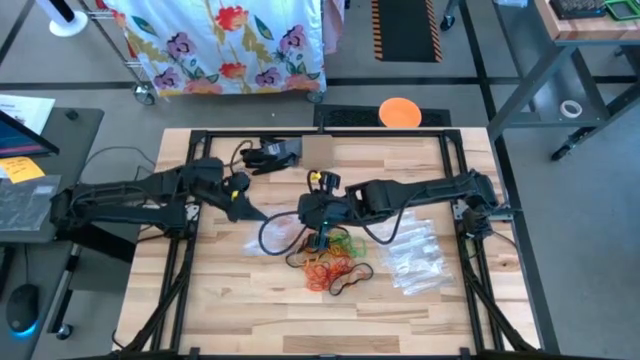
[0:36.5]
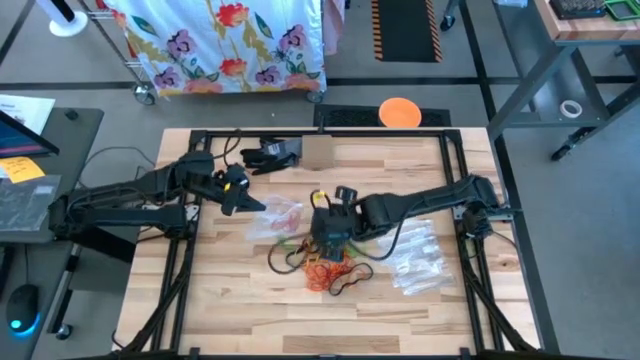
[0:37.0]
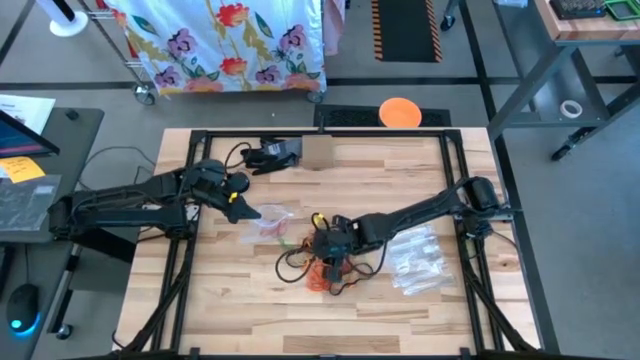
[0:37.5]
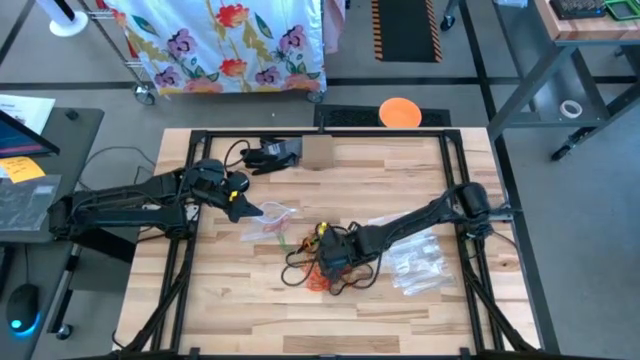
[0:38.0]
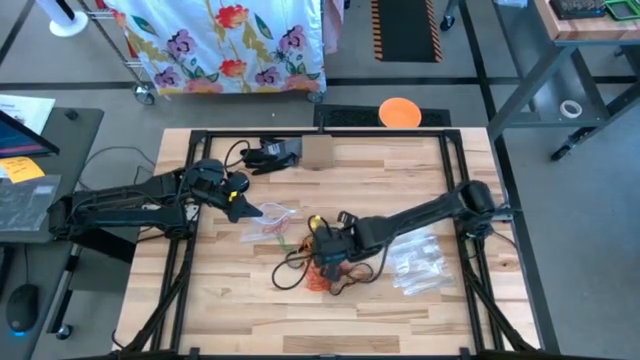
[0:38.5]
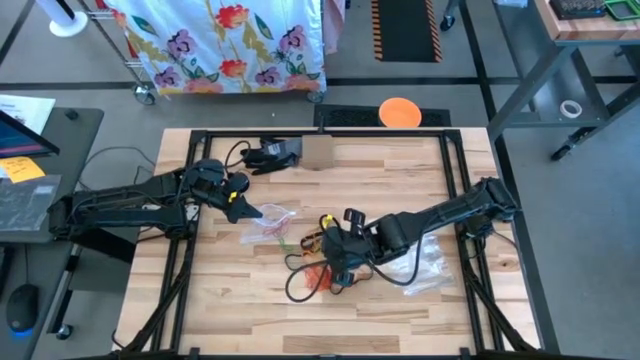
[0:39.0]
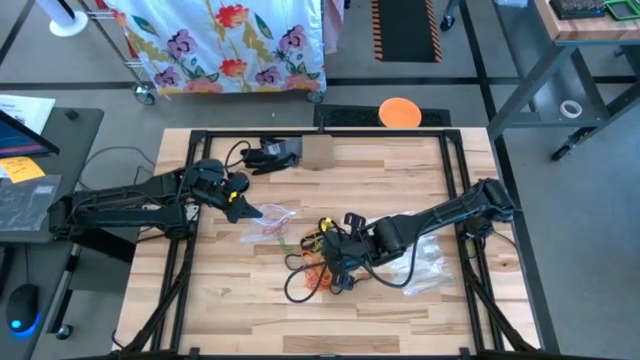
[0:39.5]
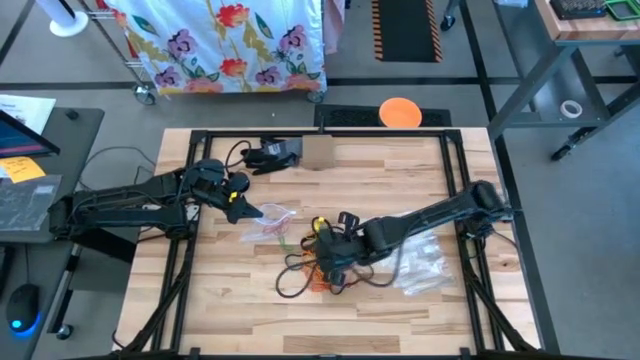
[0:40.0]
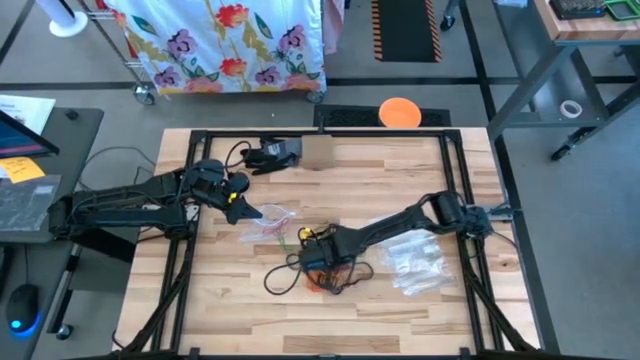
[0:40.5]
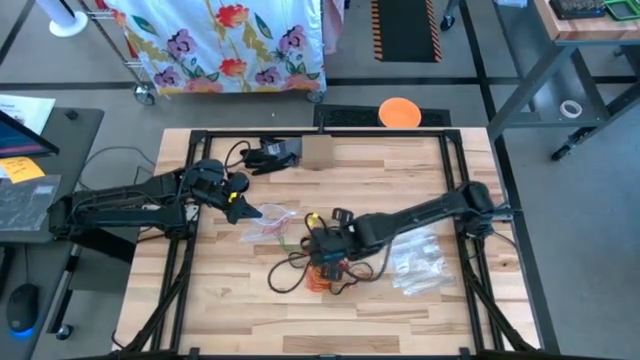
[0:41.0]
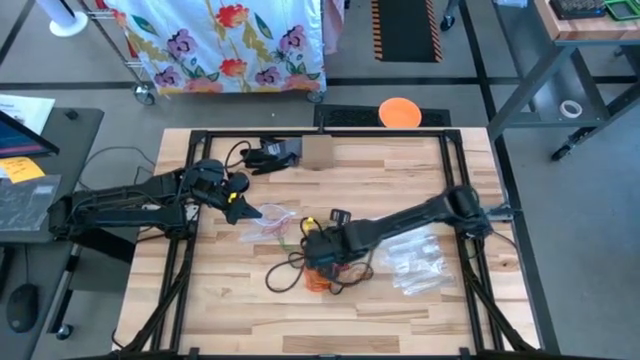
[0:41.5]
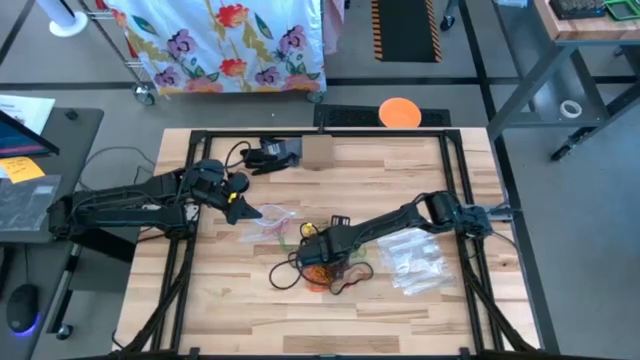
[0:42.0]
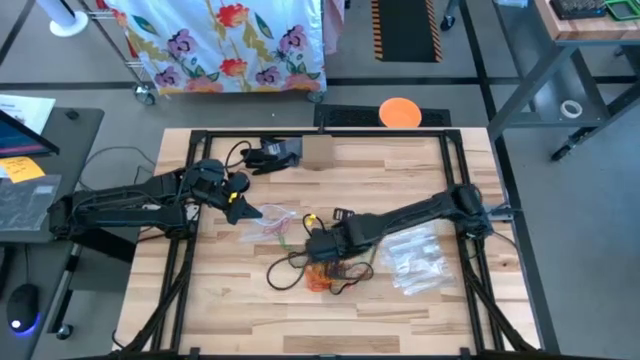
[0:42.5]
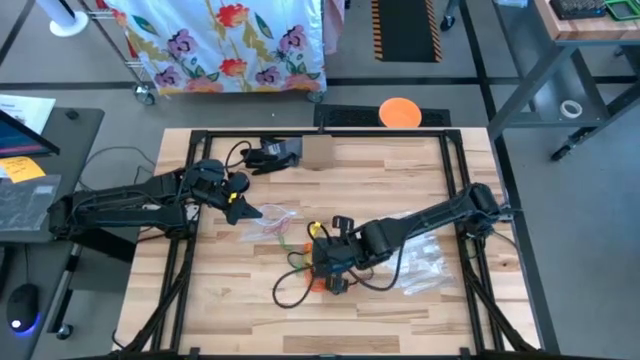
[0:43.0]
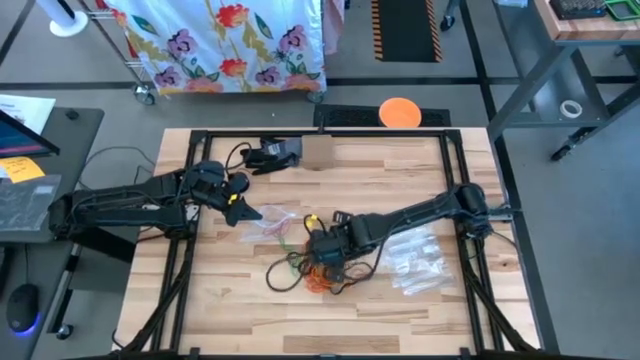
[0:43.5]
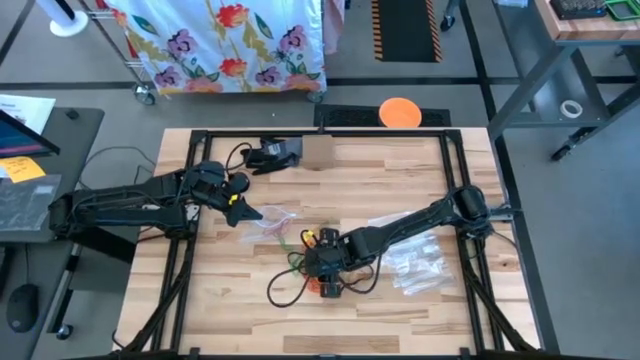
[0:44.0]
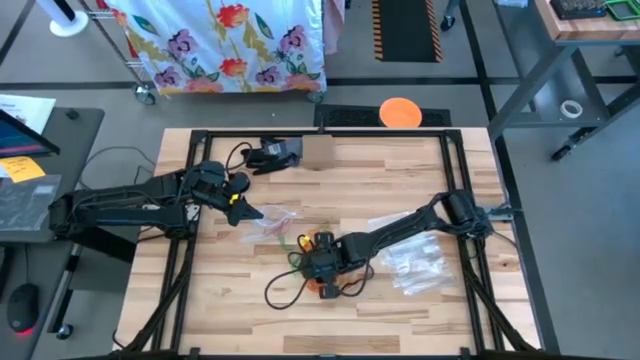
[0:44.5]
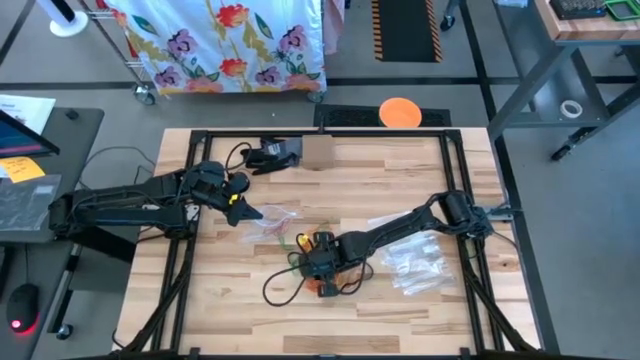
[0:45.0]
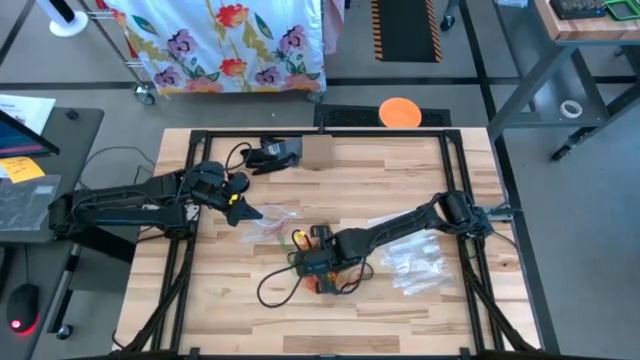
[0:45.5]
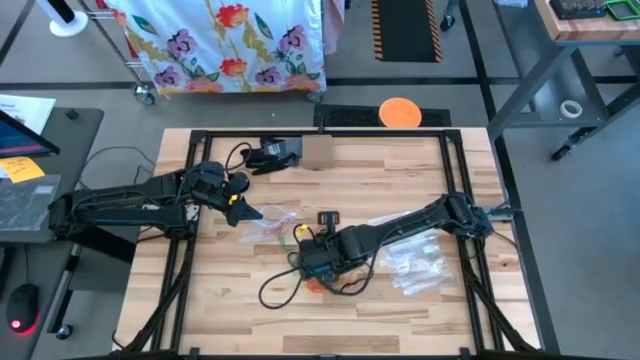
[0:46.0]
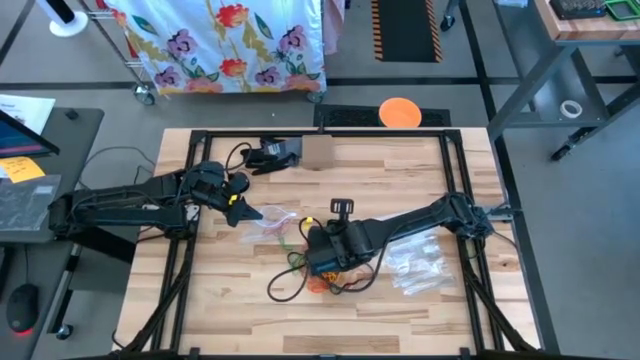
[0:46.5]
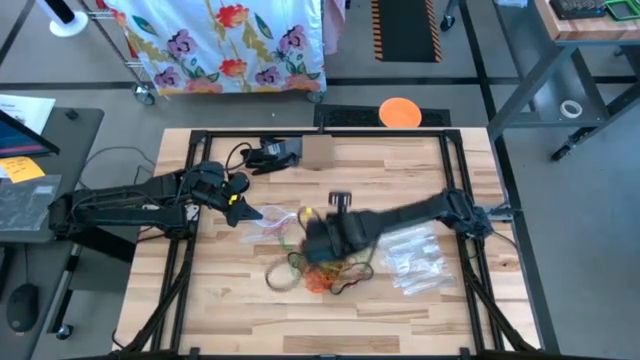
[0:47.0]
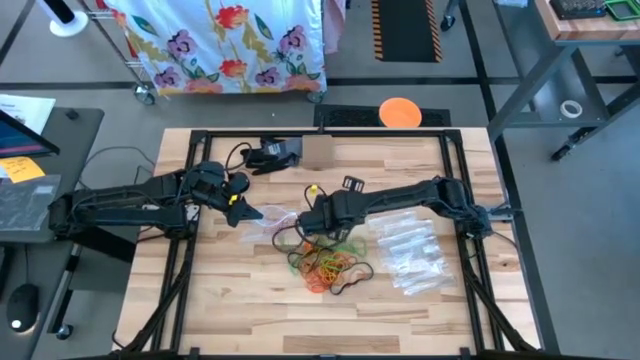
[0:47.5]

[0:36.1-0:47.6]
Task: Sort rubber bands
Put the red rubber band into the transparent zip bag

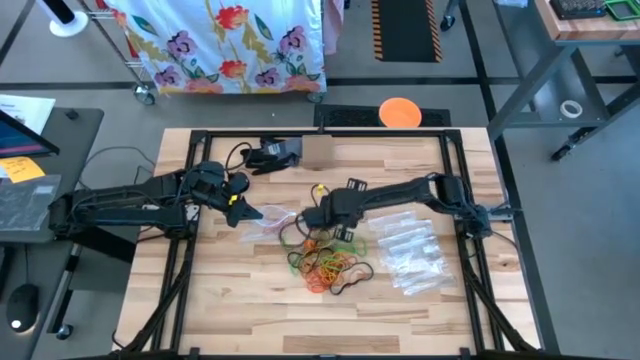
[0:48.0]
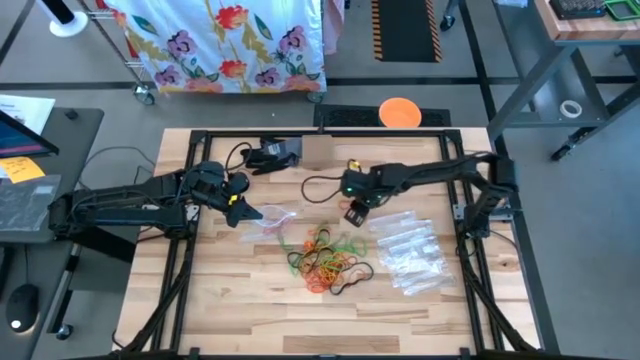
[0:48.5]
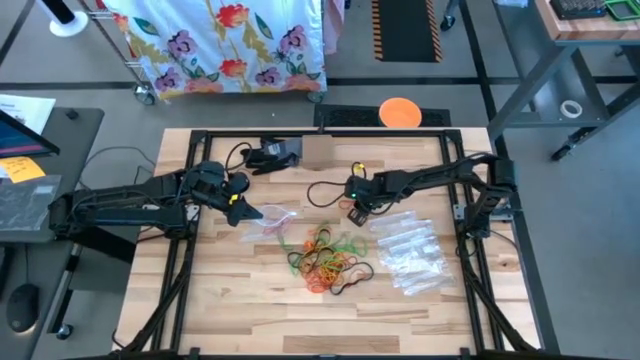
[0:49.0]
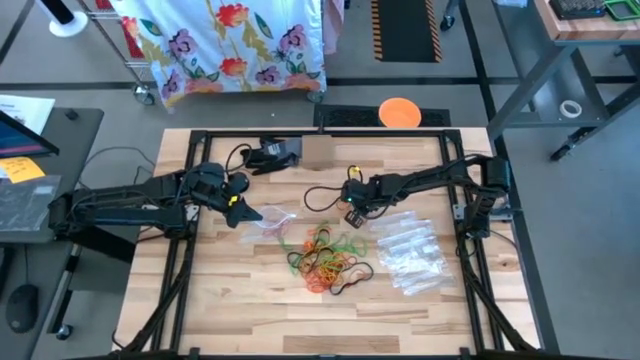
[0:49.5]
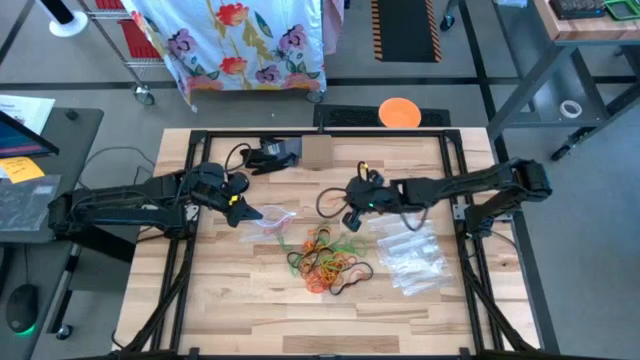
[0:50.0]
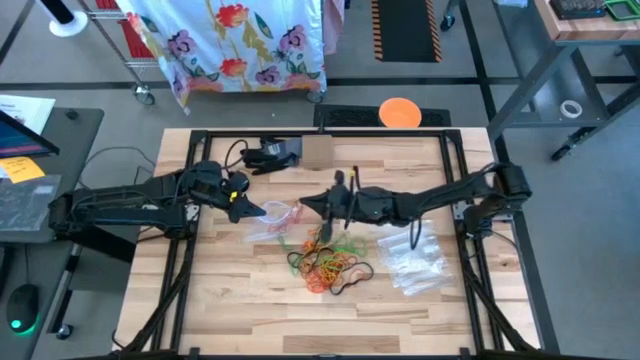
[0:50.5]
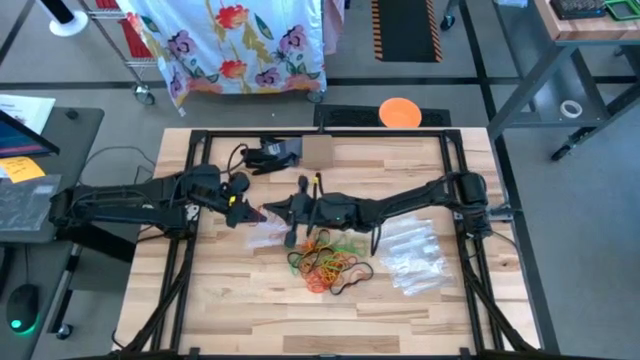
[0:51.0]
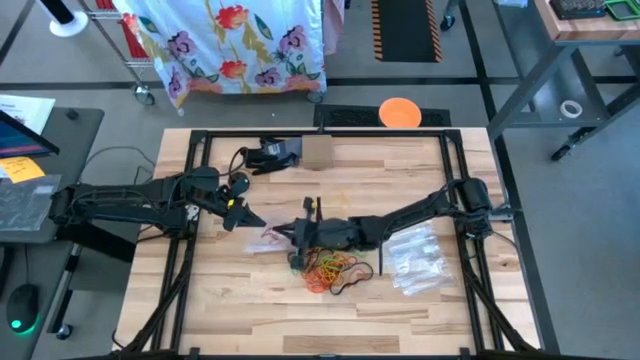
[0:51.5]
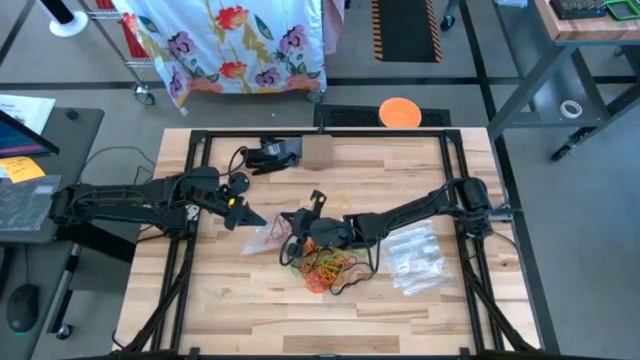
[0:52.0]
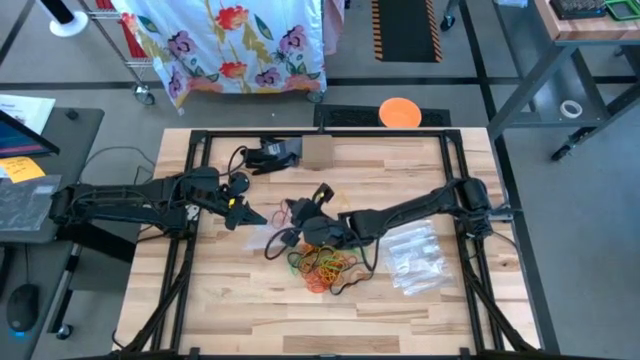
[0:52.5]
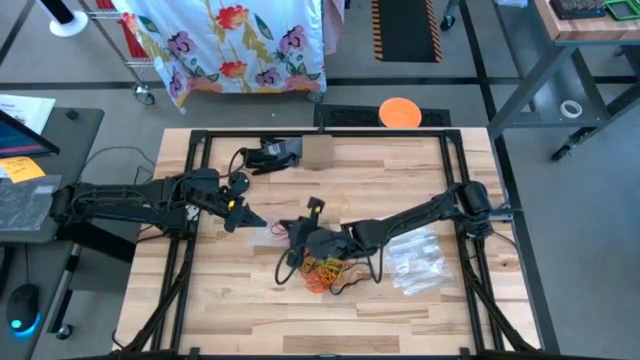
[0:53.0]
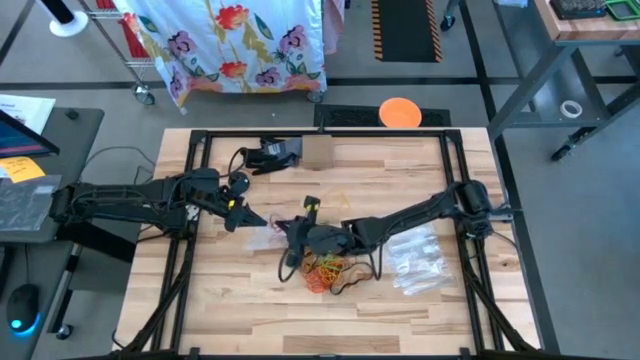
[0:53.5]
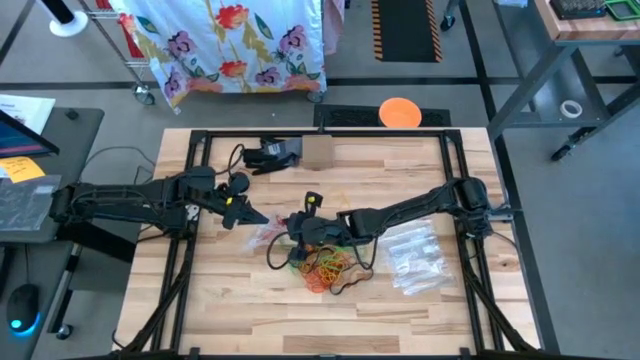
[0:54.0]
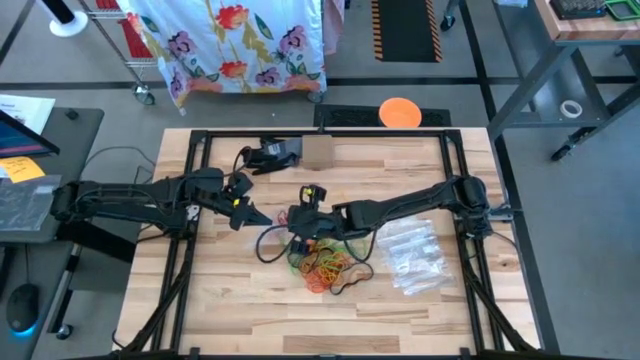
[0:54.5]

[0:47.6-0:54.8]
Put the red rubber band into the transparent zip bag

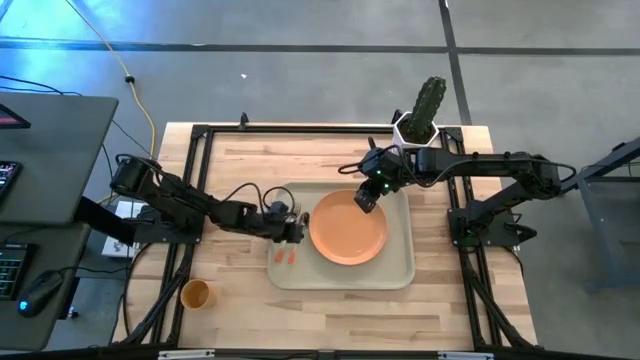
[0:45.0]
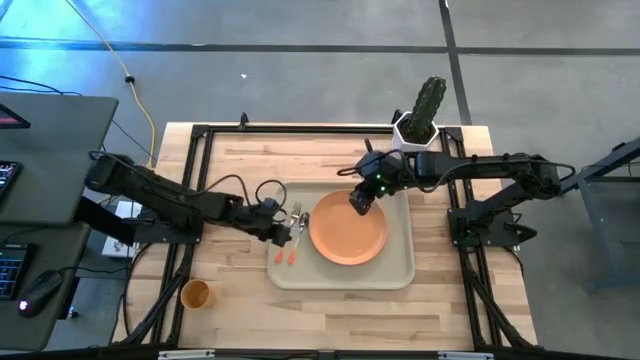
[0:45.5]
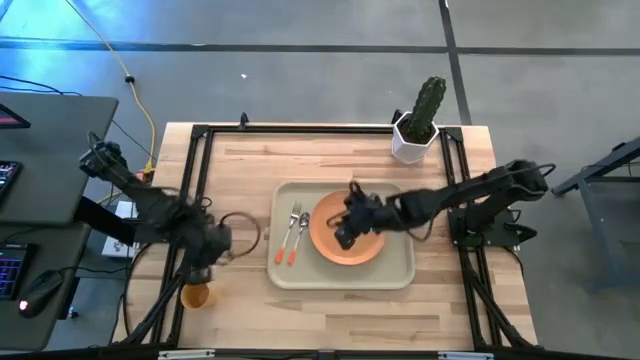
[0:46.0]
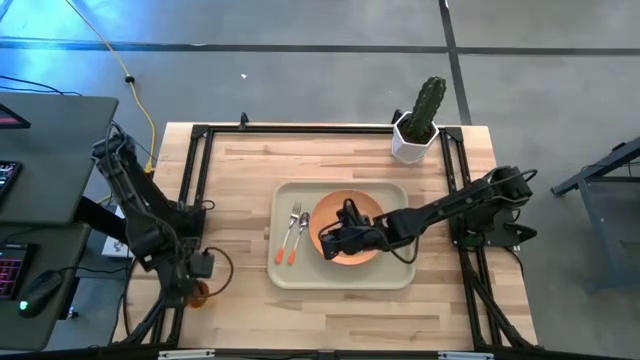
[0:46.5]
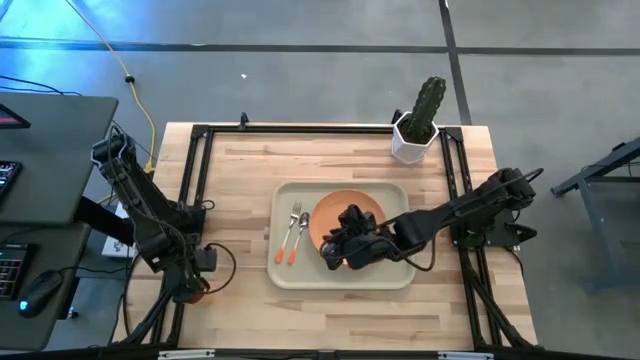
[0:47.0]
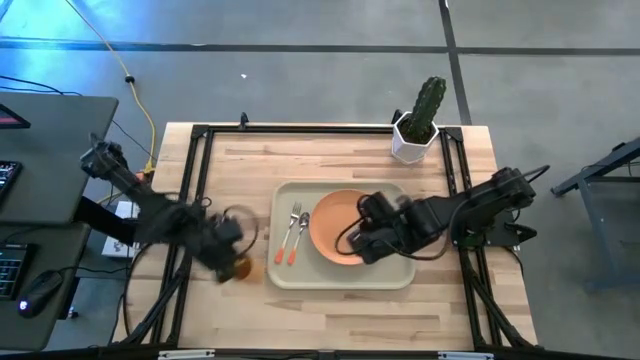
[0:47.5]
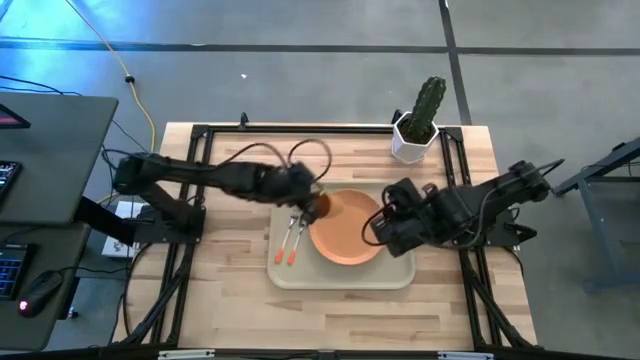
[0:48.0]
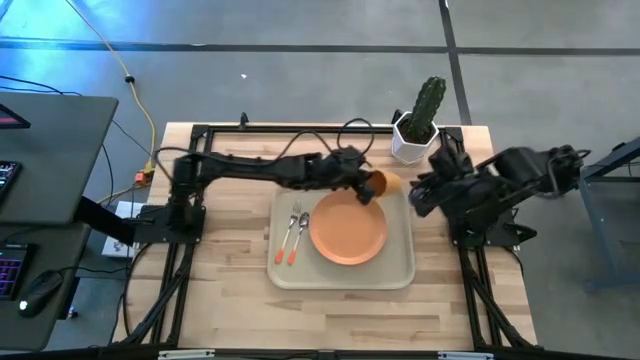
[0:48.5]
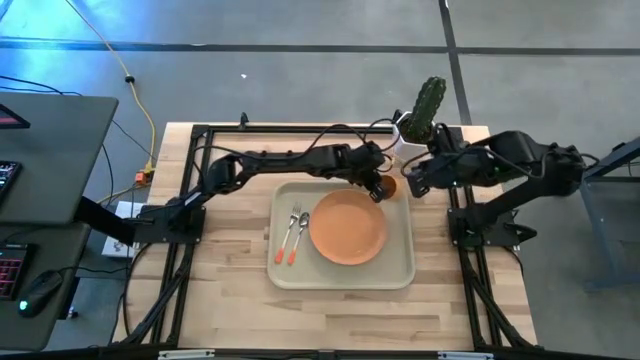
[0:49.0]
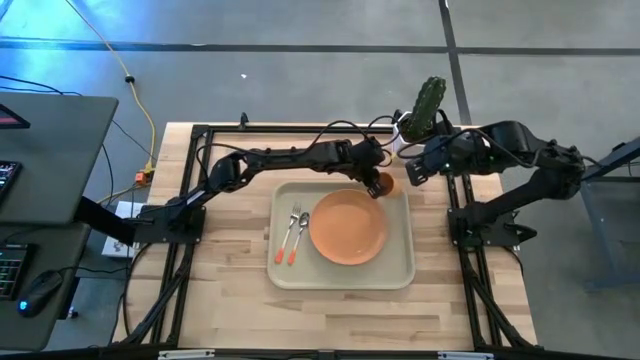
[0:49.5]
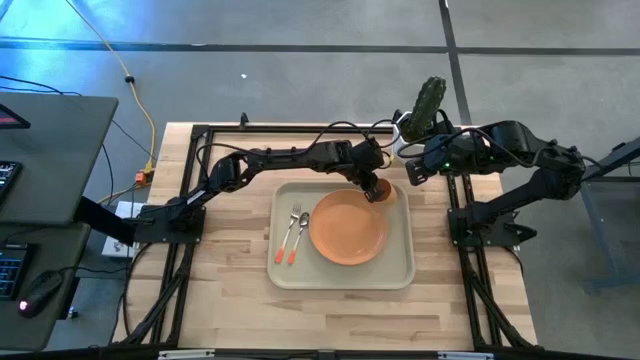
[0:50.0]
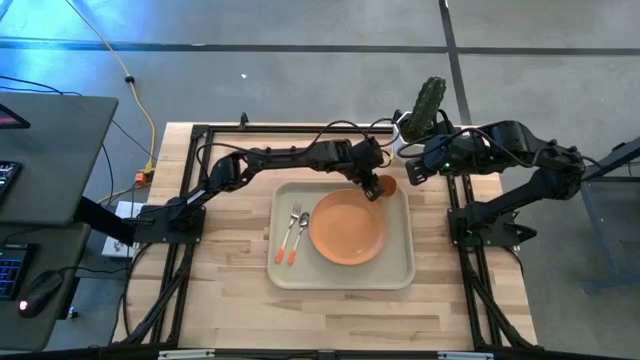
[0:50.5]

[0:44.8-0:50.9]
Task: Pick and place plate/cup/fork/spoon on tray
Put the orange cup on the light brown serving tray to the top right of orange plate
